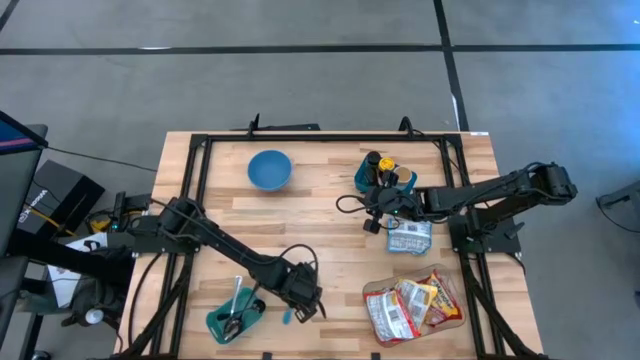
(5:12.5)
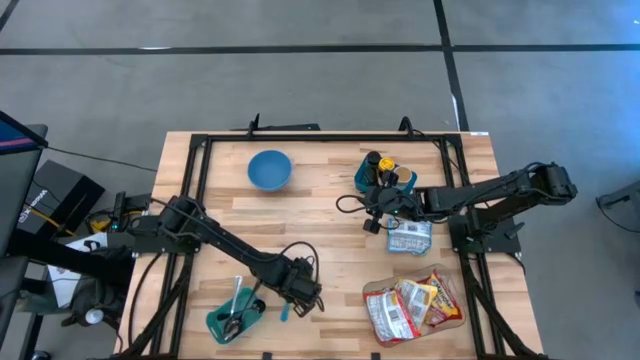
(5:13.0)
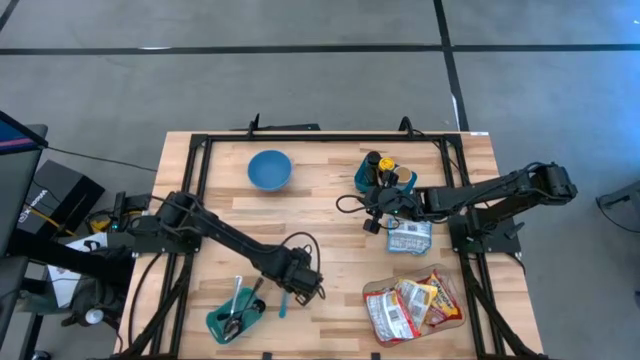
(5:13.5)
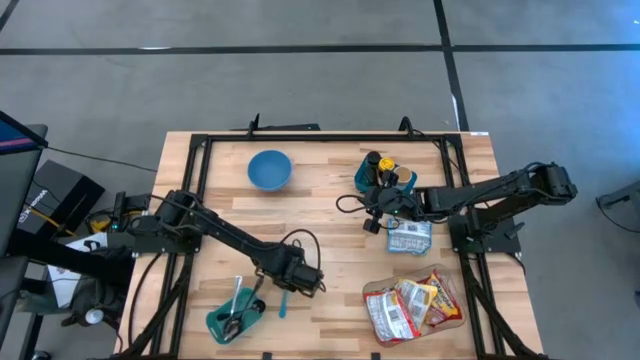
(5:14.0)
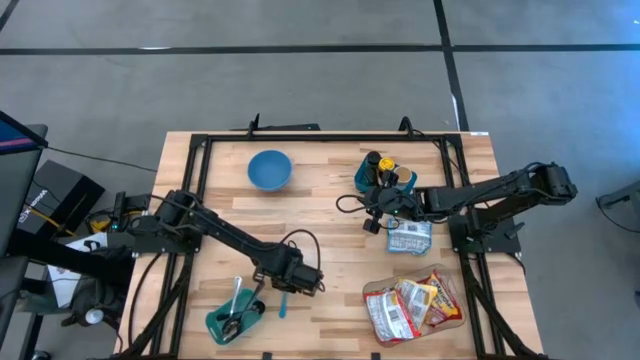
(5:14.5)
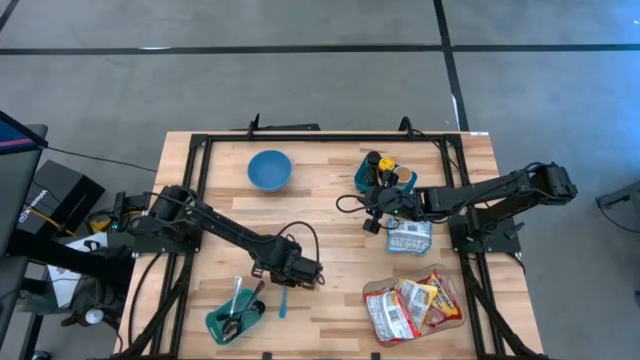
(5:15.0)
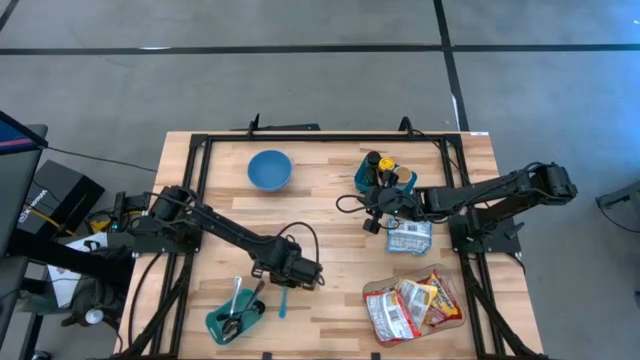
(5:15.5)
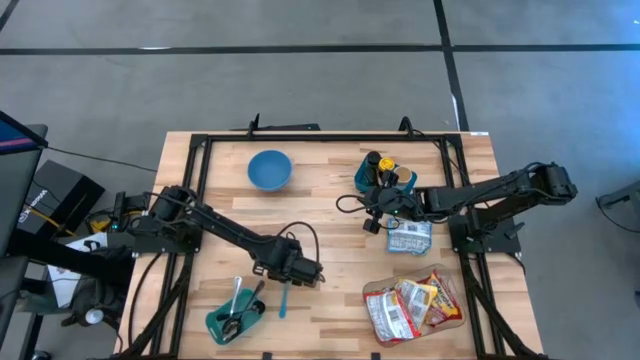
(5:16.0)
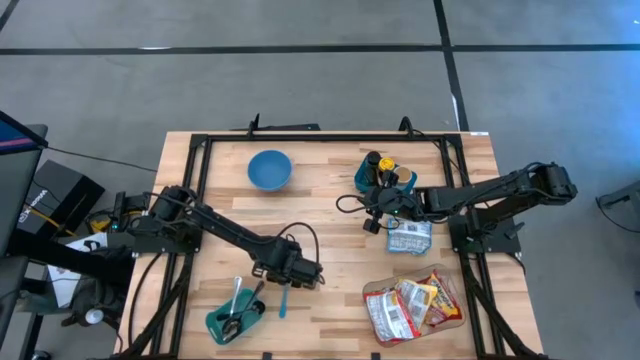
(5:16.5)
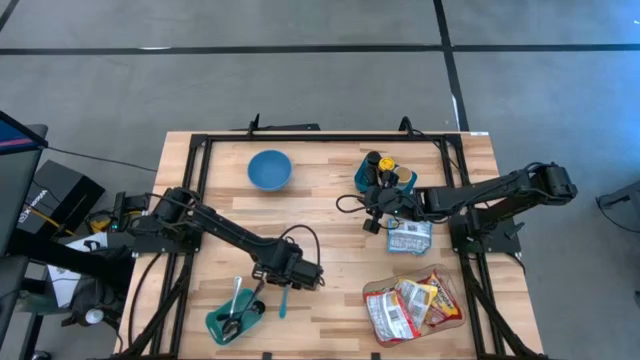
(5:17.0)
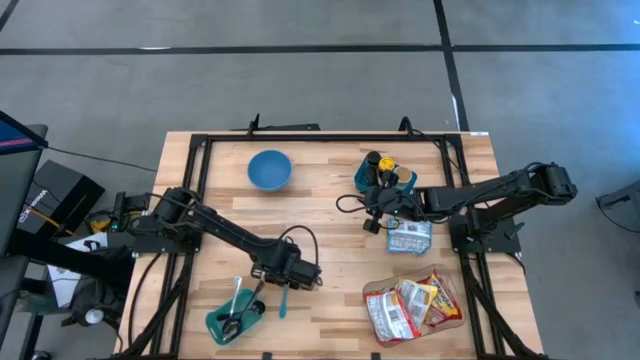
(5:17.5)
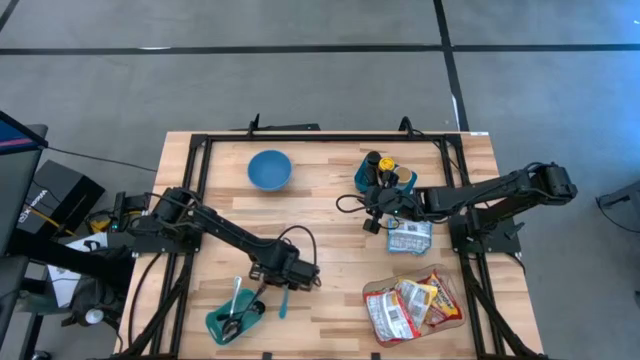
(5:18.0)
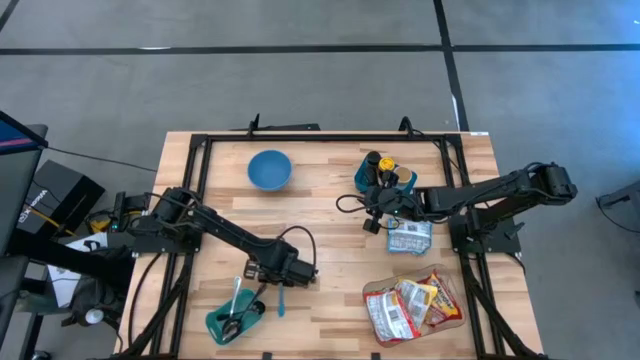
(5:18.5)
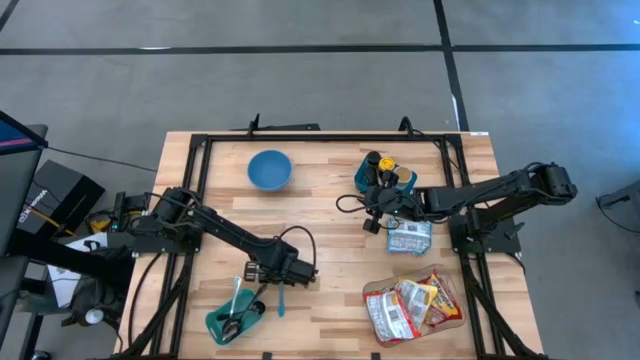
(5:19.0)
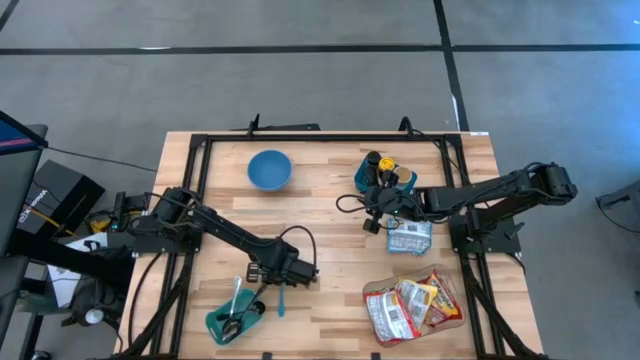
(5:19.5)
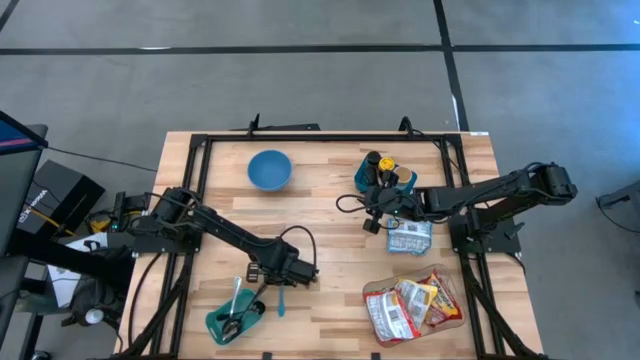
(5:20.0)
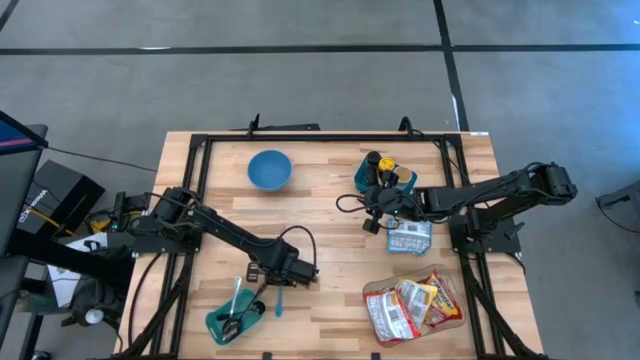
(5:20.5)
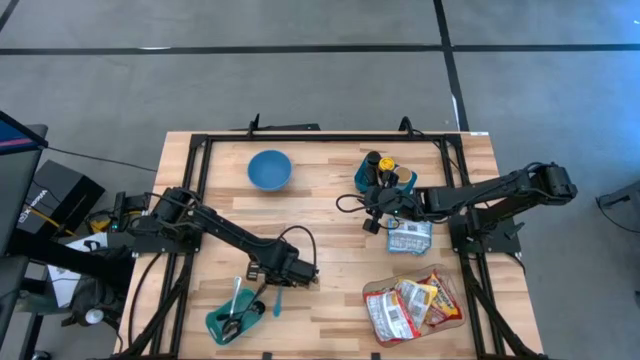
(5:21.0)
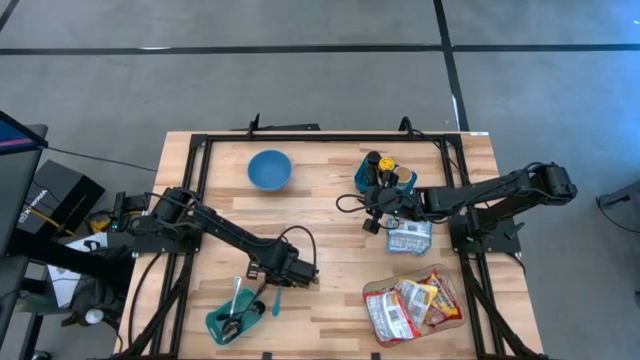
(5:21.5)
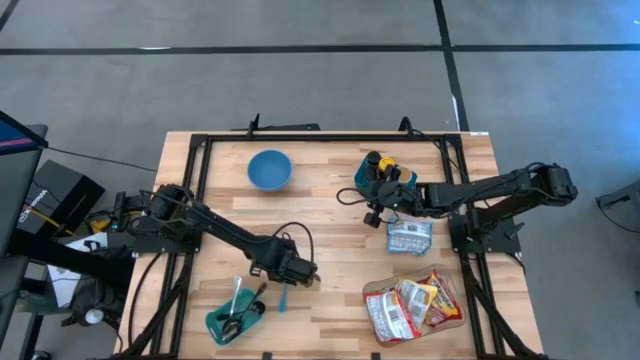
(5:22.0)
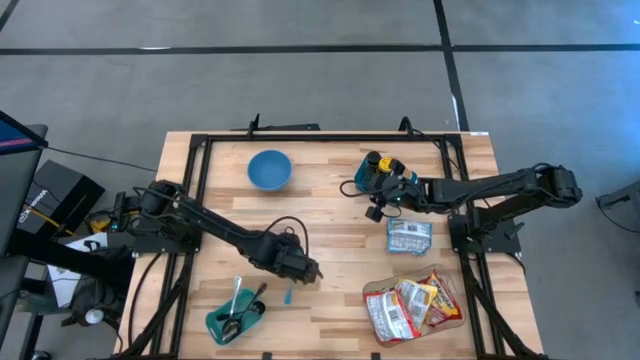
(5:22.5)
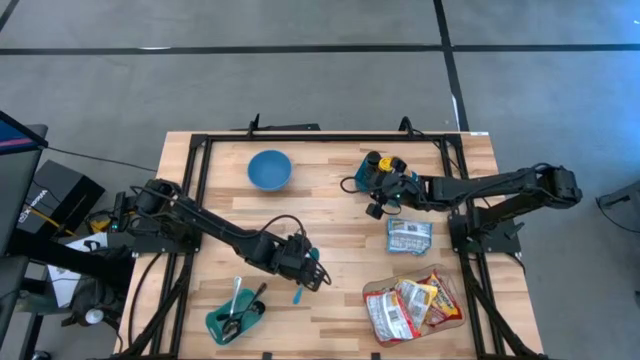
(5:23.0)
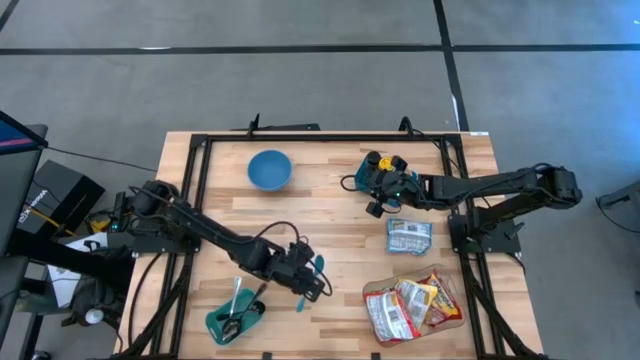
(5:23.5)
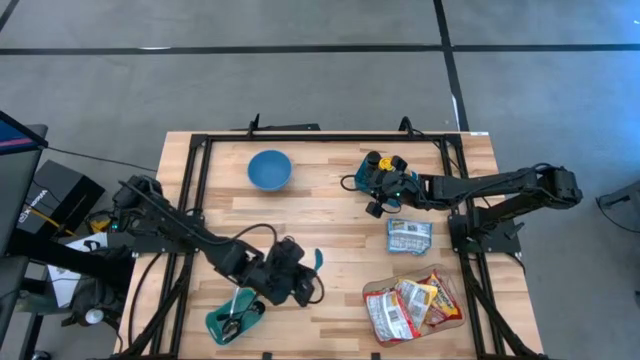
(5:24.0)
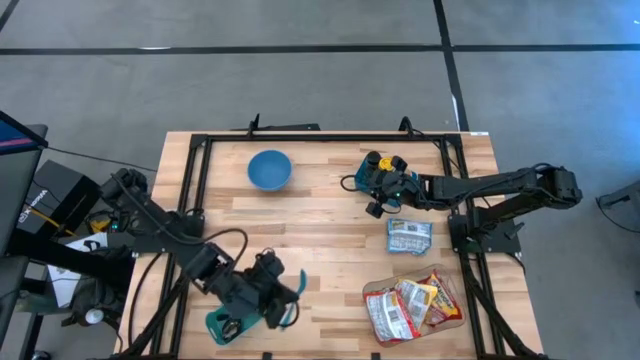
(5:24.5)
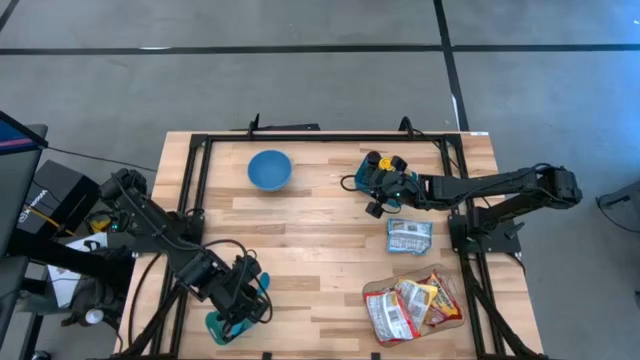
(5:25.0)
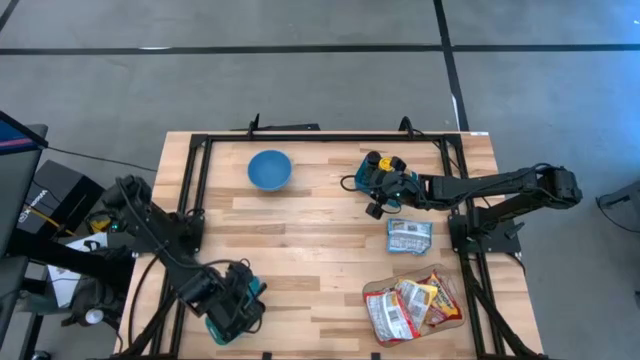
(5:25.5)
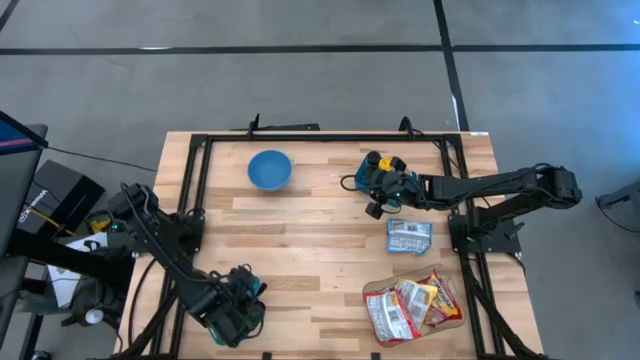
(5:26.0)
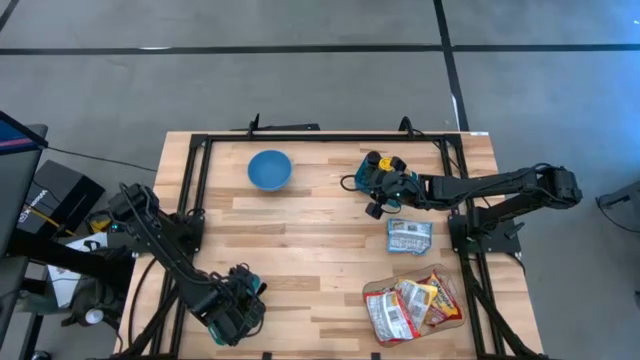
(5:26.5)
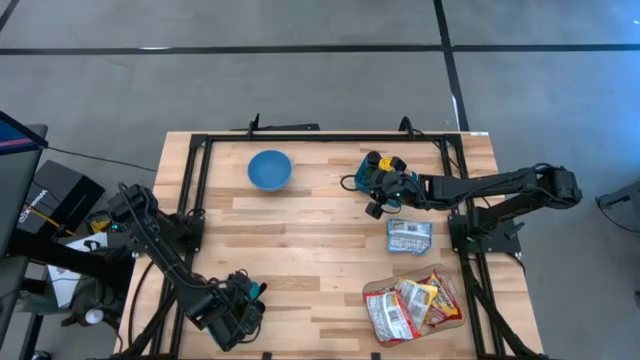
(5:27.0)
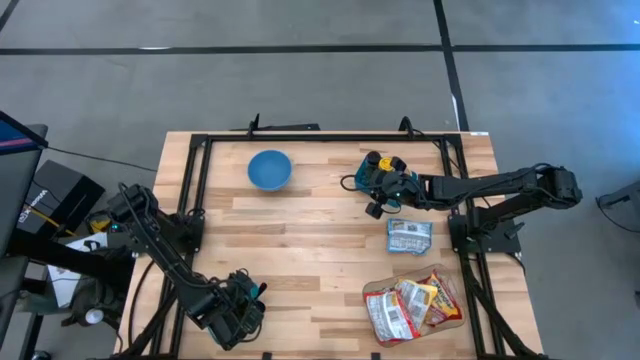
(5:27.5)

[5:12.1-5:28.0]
Task: Pick & Place Food Item
Put the blue spoon into the green bin

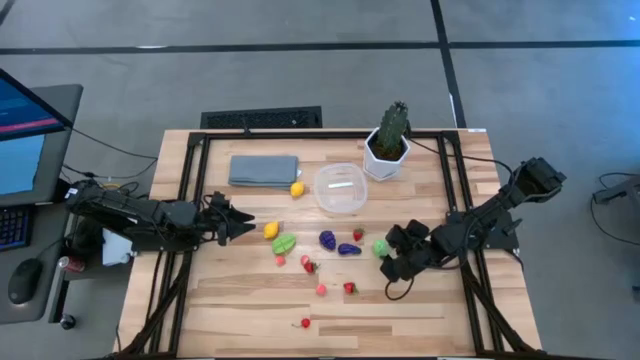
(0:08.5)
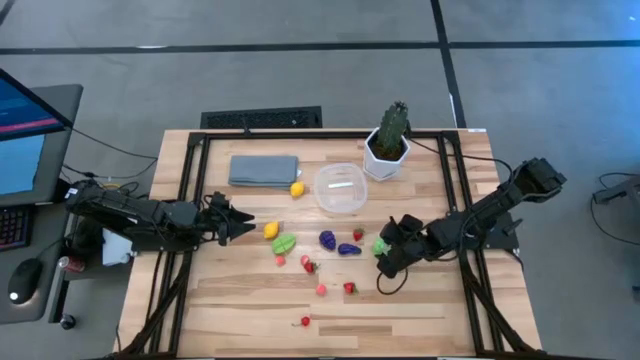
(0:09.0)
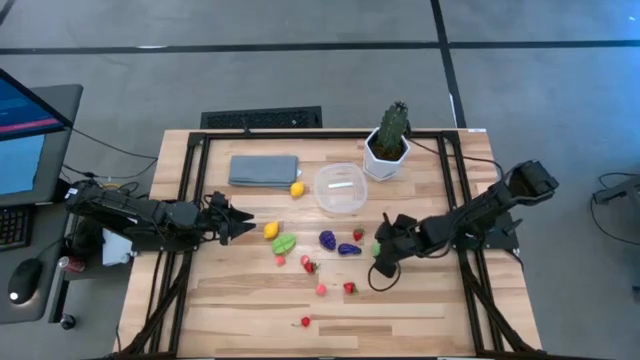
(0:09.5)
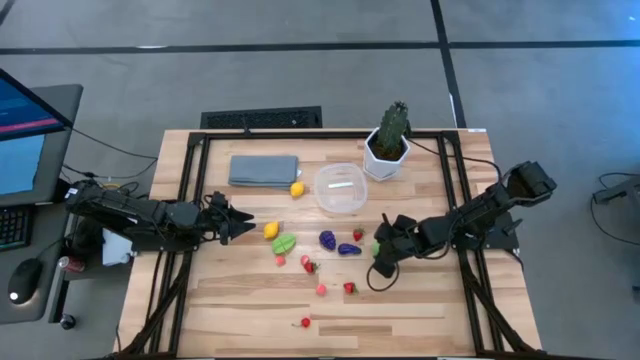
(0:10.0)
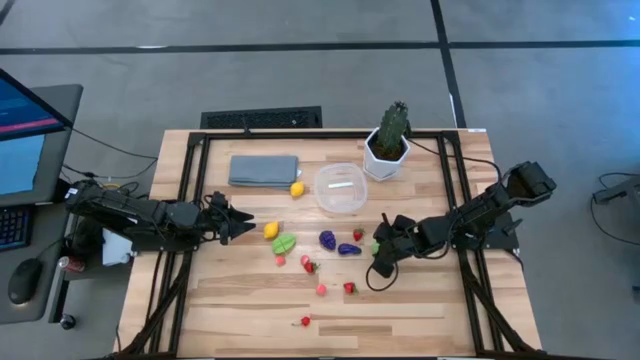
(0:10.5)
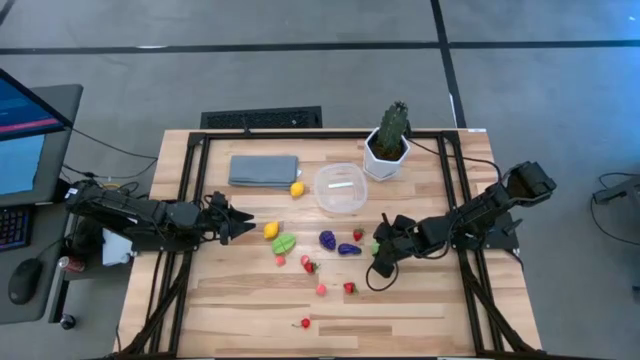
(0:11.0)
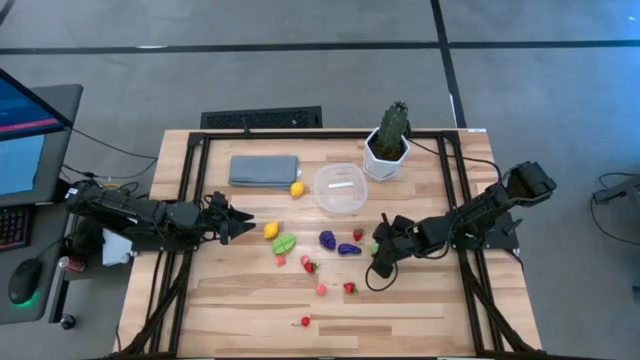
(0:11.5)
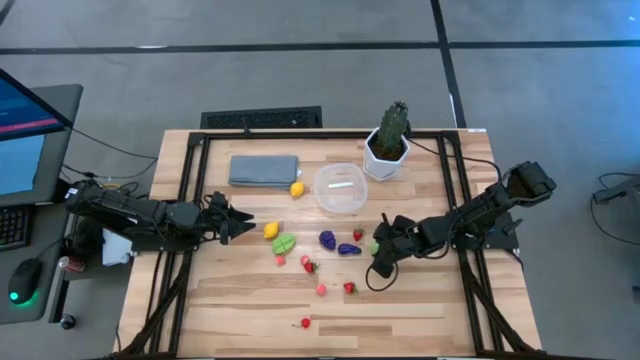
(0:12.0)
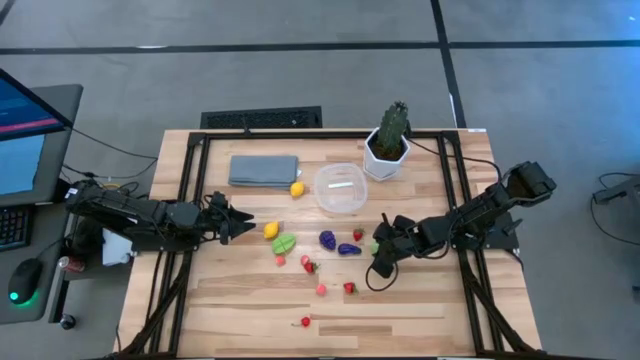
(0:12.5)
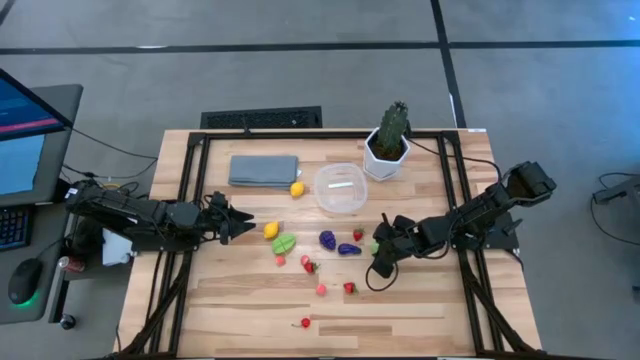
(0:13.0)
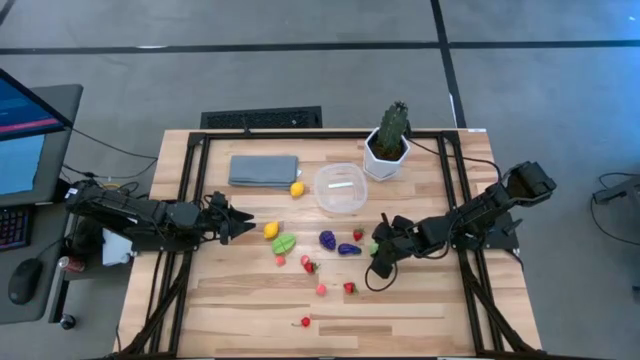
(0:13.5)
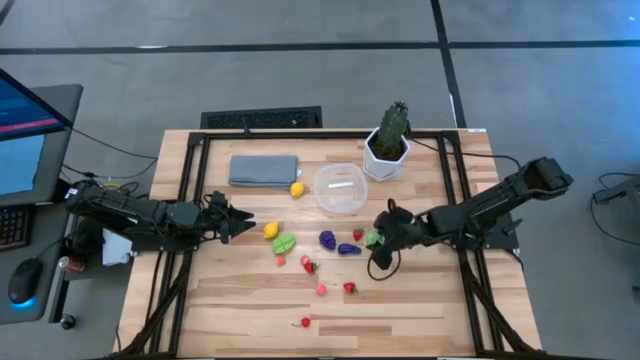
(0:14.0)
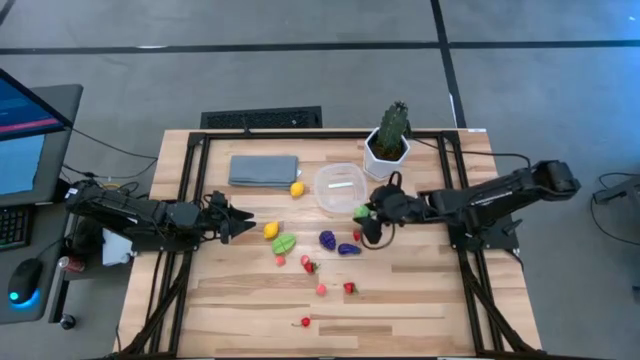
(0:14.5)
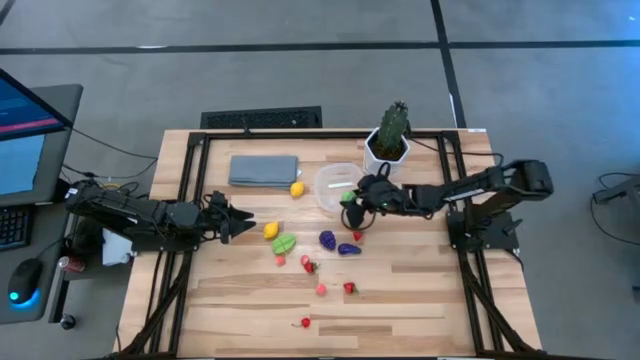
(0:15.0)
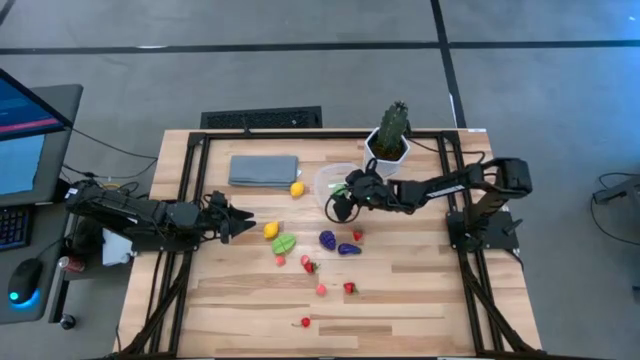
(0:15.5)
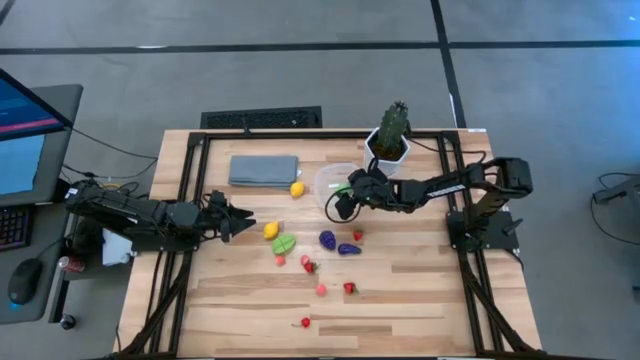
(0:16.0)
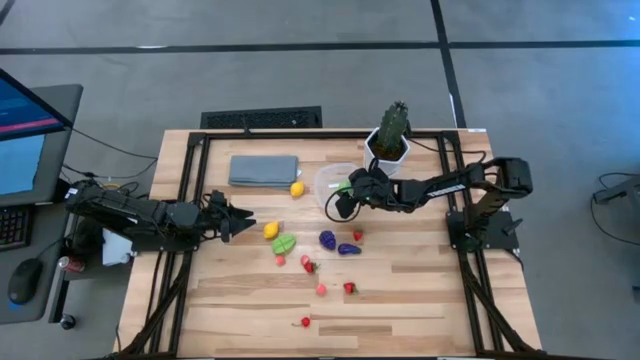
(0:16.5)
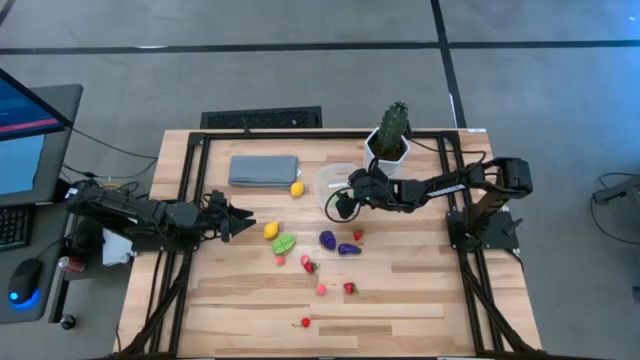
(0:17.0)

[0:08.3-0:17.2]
Task: Pick and placing Produce into tupperware
Put the cabbage into the transparent bin
